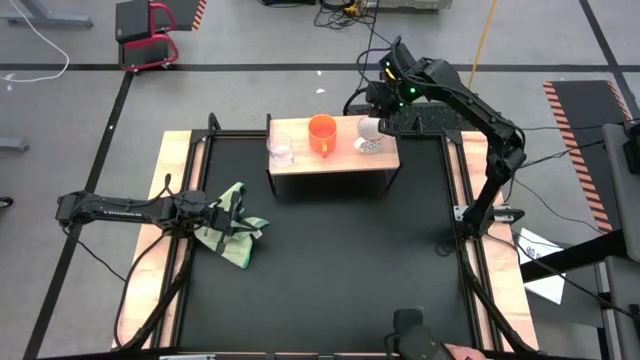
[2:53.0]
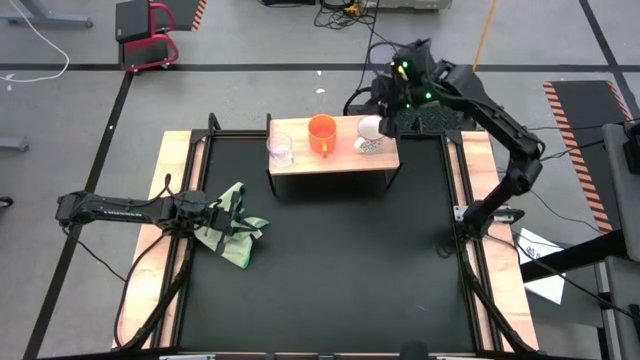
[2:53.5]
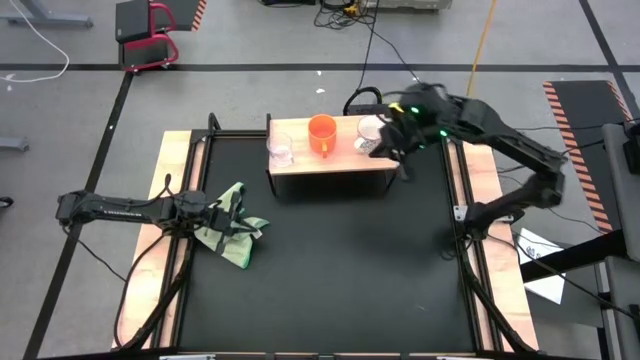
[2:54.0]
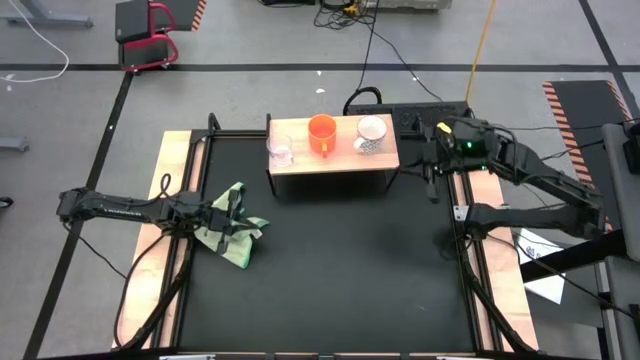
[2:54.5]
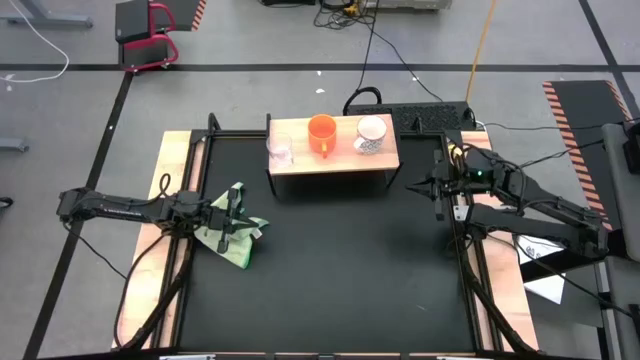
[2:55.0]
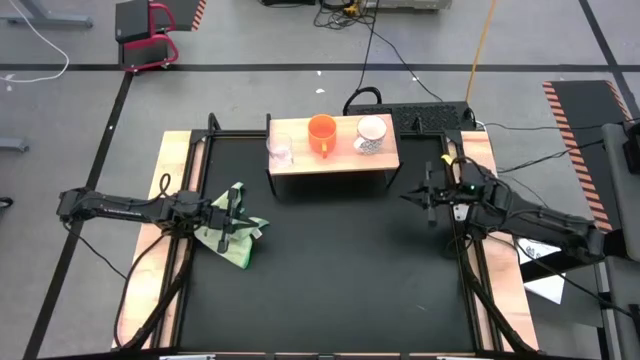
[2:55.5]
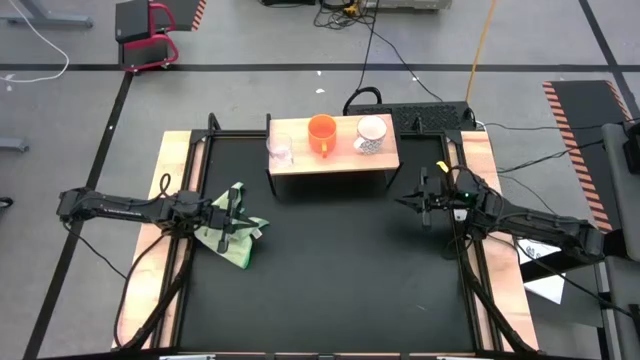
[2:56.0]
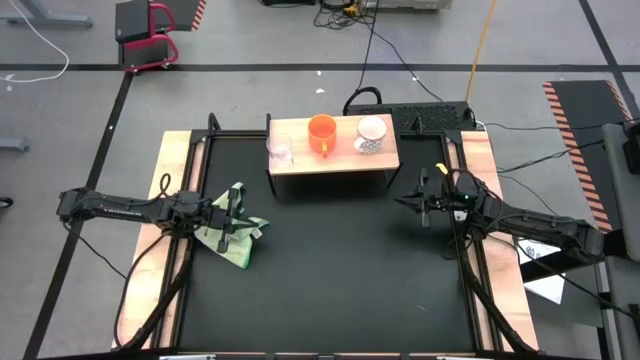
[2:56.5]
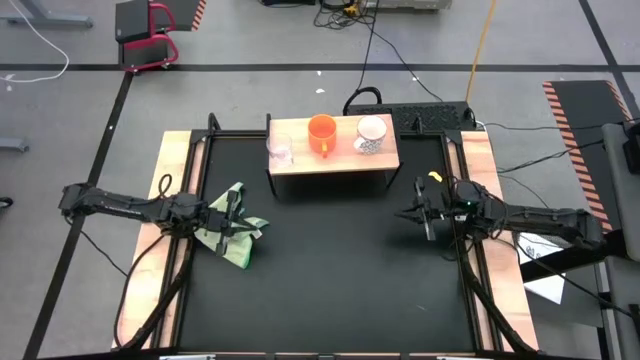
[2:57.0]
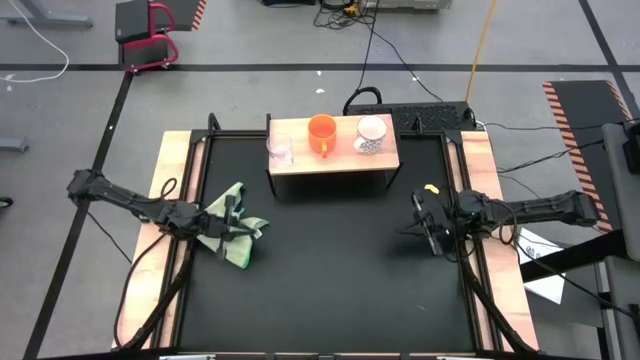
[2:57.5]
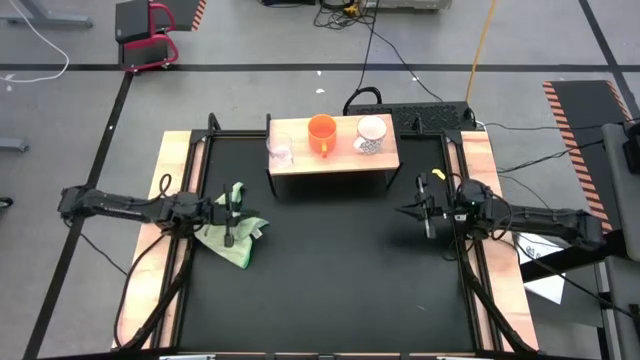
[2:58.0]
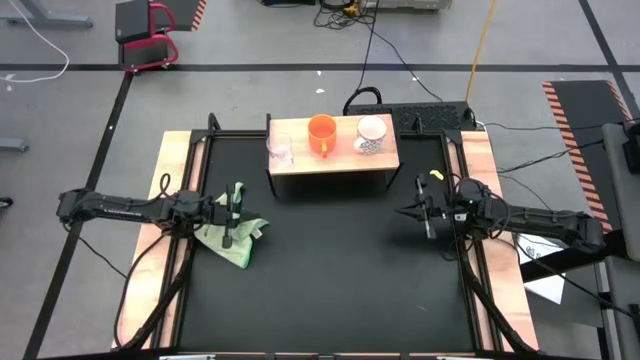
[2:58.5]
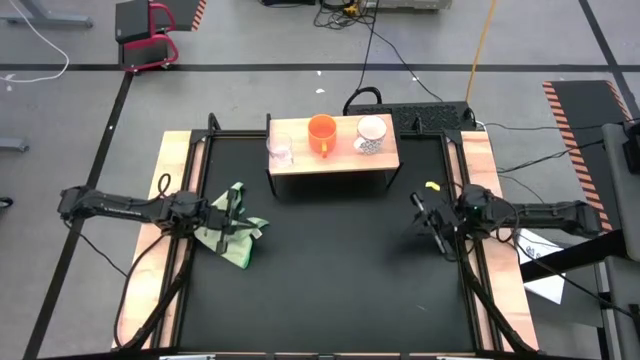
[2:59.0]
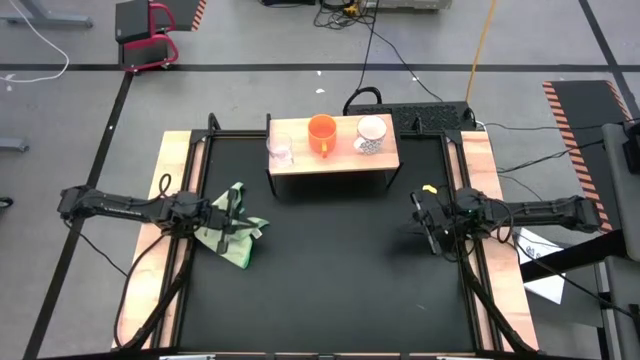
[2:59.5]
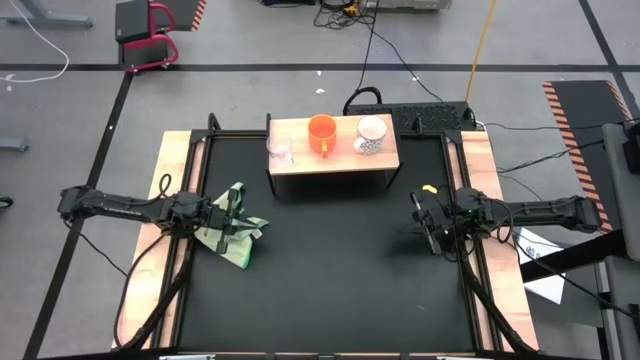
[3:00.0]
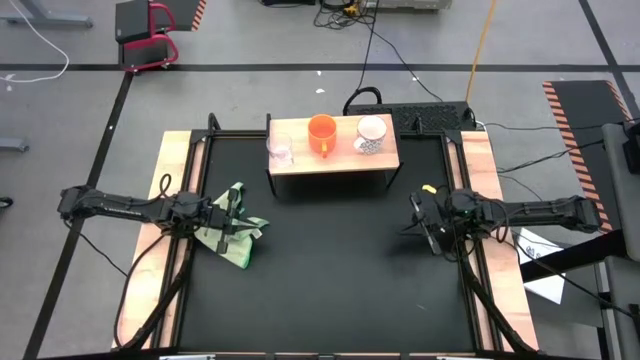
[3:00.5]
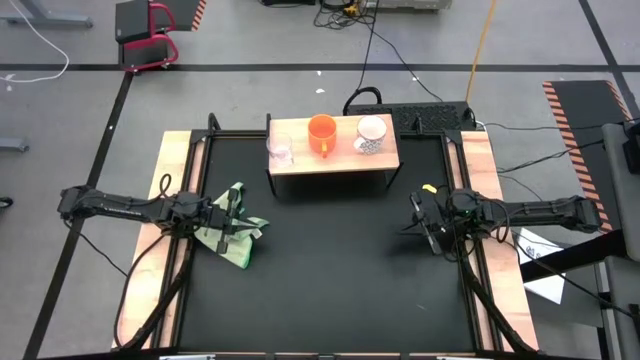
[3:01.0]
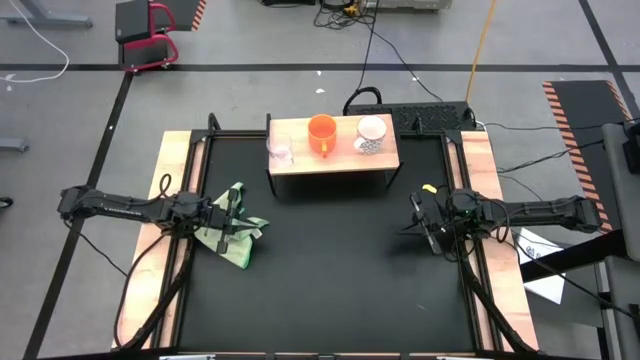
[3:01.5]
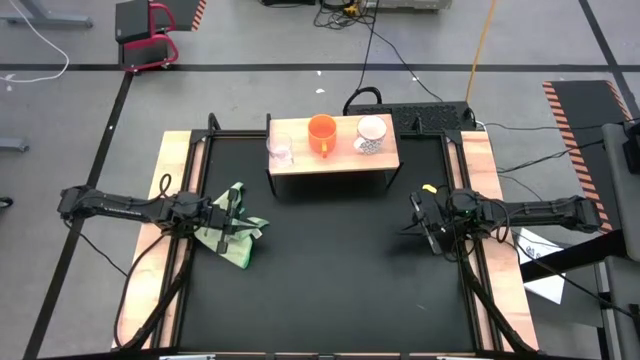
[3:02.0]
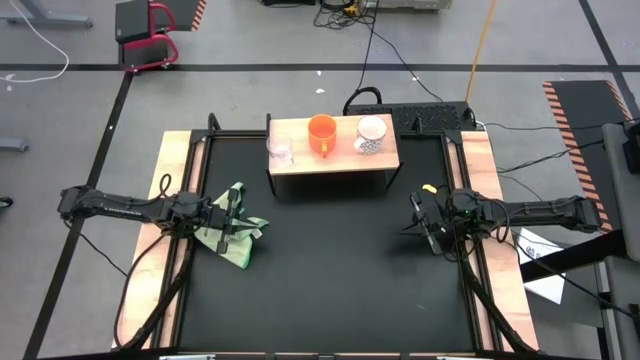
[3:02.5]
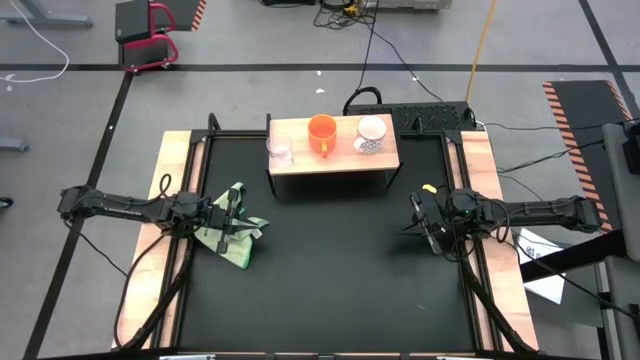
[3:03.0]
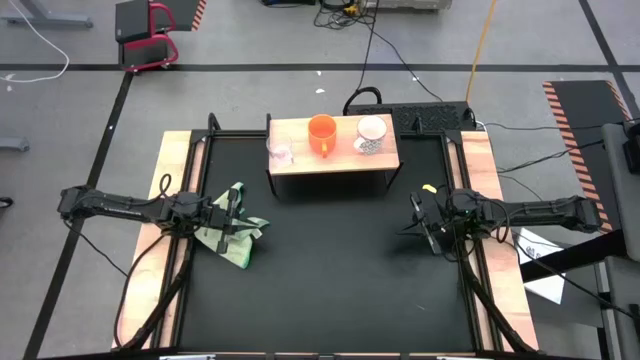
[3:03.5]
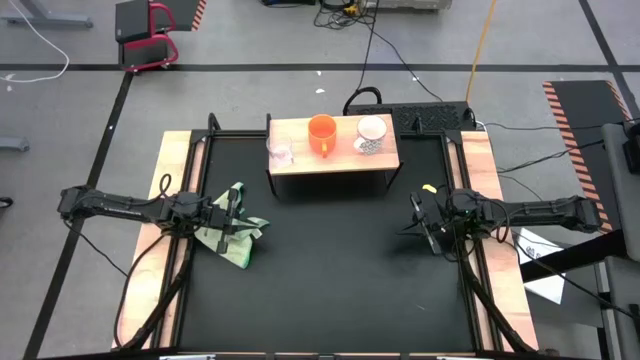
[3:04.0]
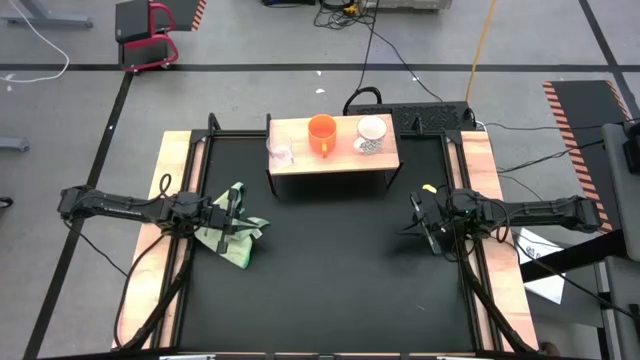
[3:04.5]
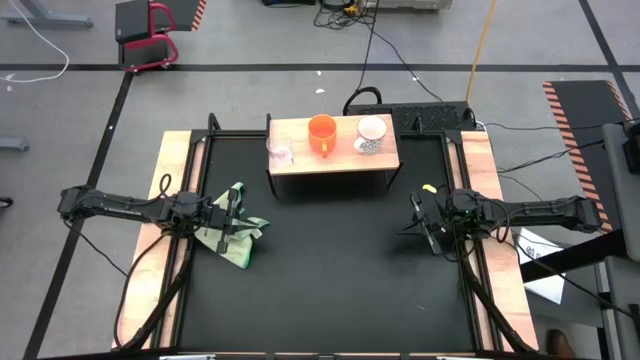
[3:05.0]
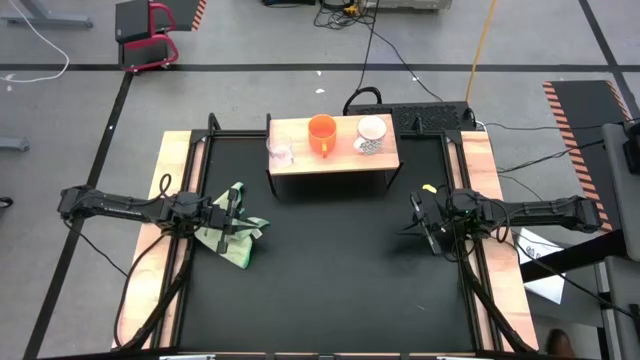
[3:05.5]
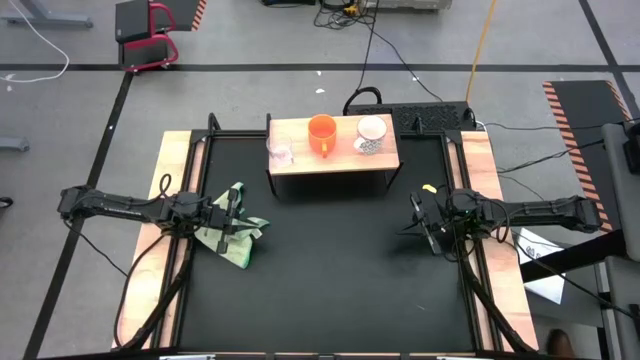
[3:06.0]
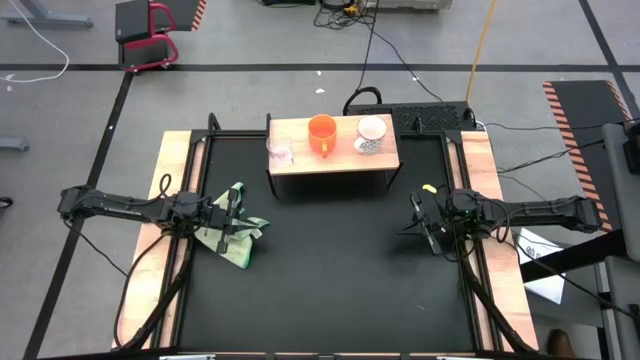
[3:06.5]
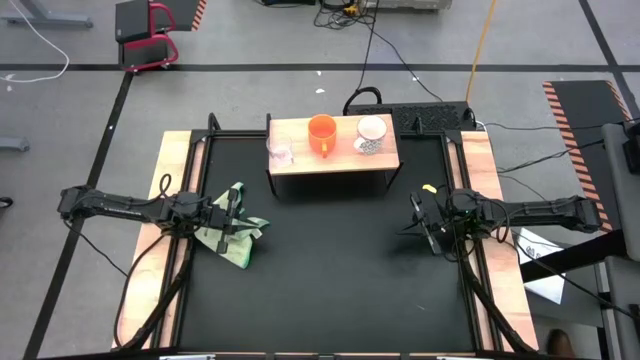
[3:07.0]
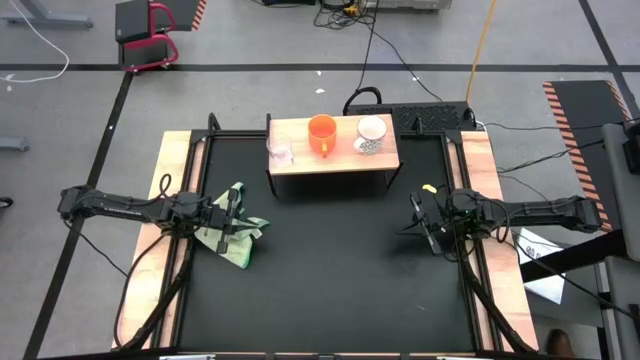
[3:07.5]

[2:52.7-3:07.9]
Task: Stack small to large cups/mugs on shelf
Return to Home Position

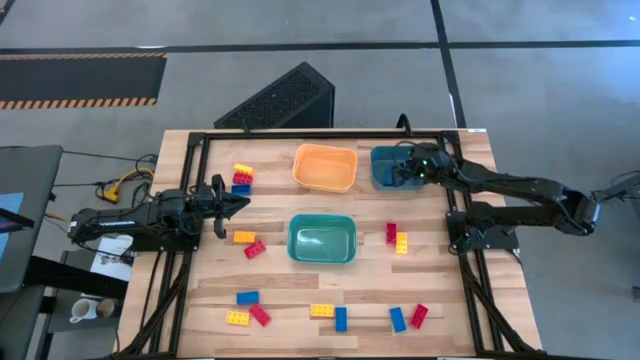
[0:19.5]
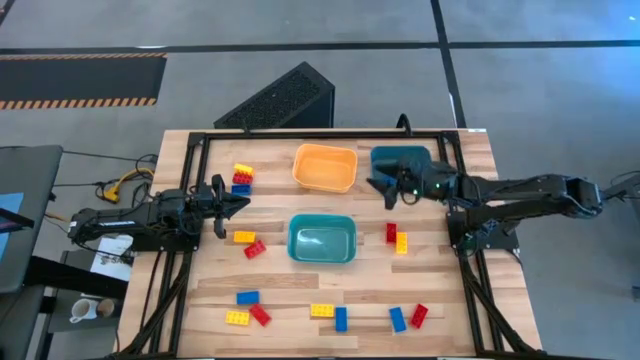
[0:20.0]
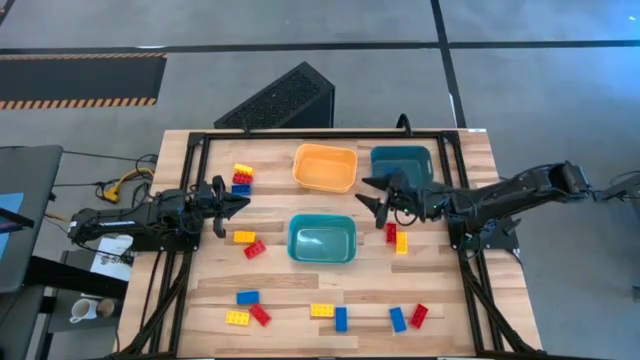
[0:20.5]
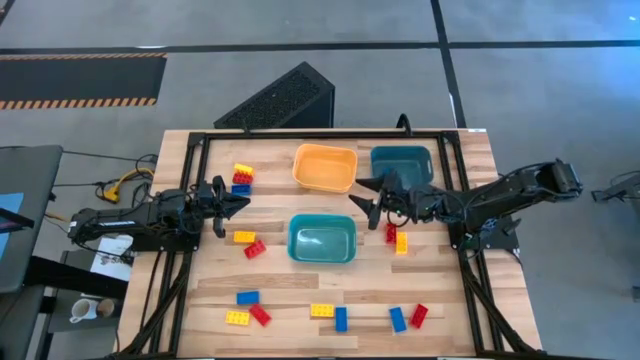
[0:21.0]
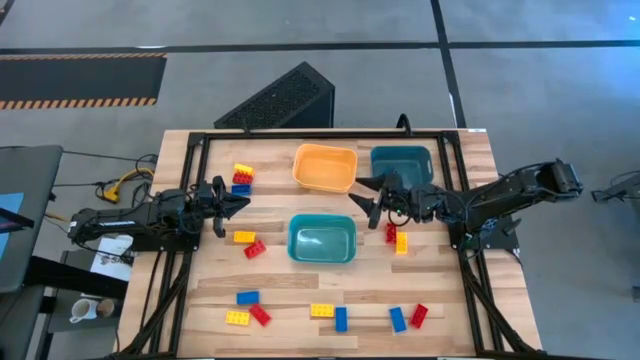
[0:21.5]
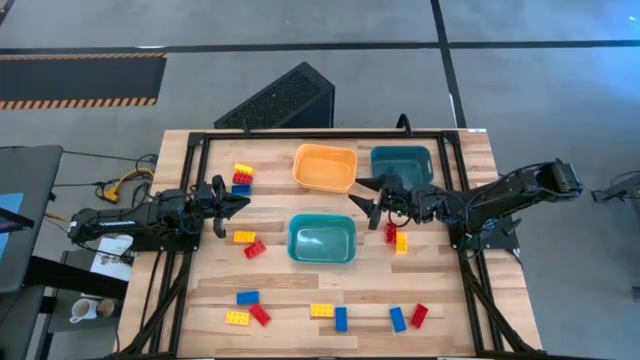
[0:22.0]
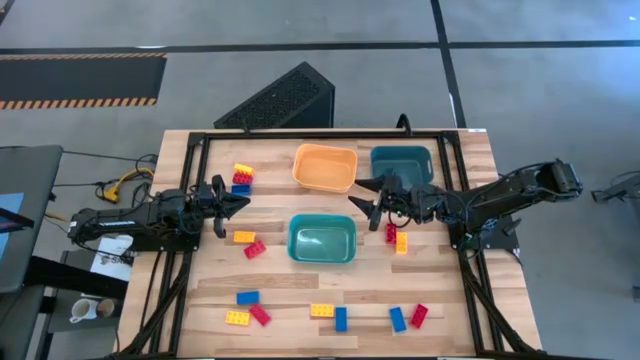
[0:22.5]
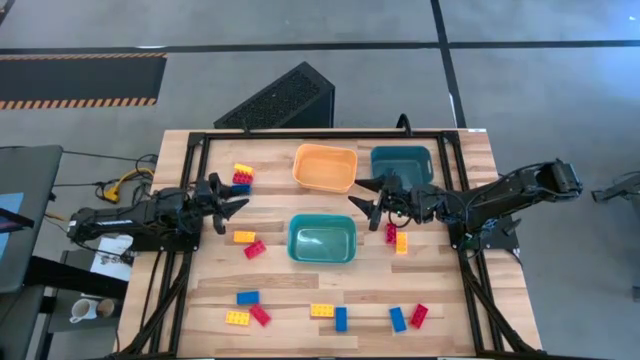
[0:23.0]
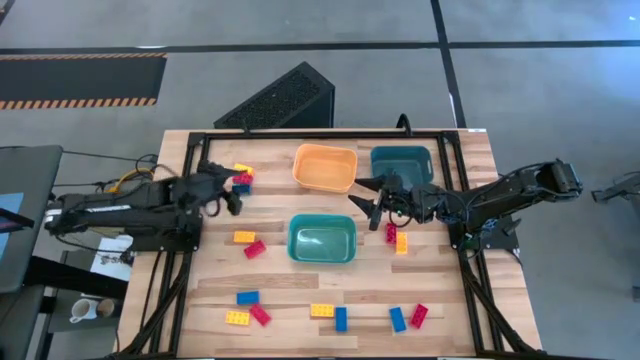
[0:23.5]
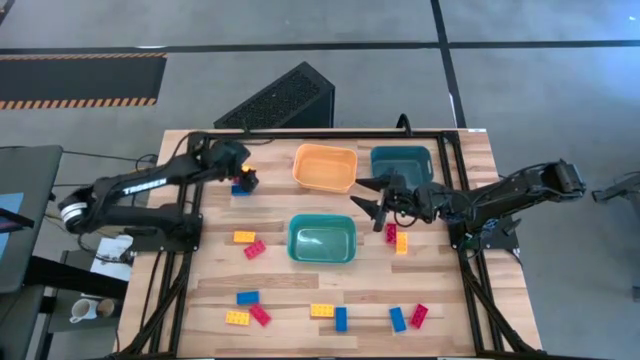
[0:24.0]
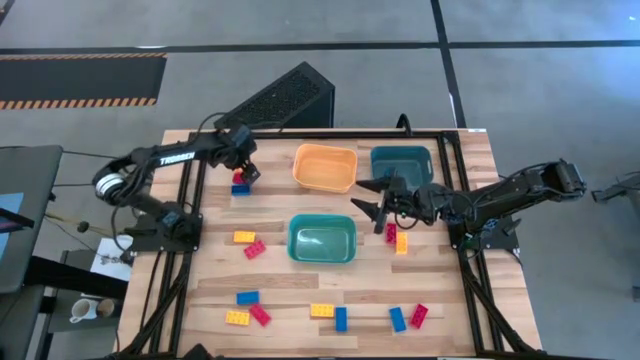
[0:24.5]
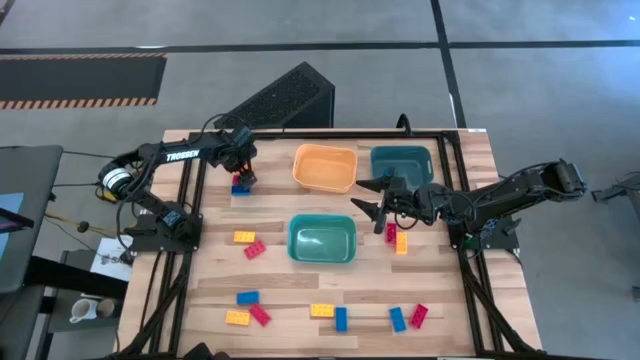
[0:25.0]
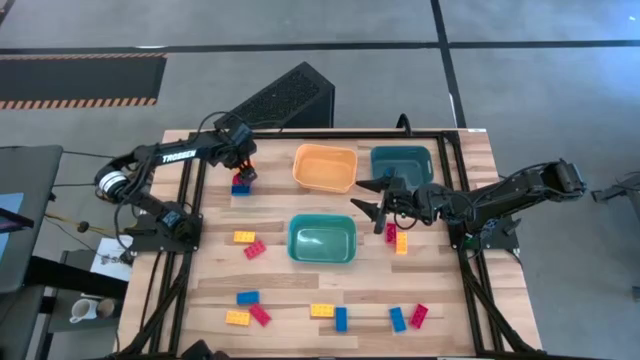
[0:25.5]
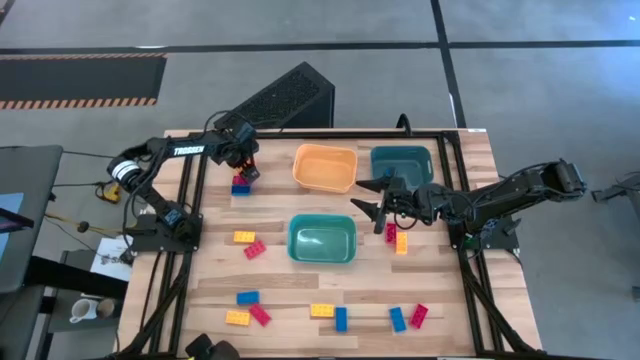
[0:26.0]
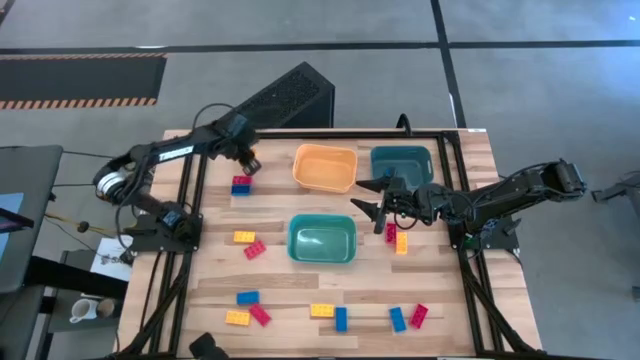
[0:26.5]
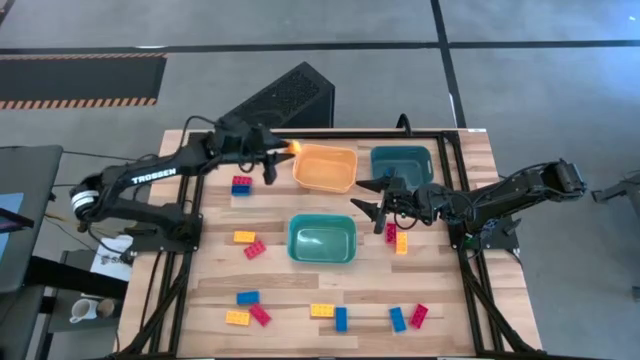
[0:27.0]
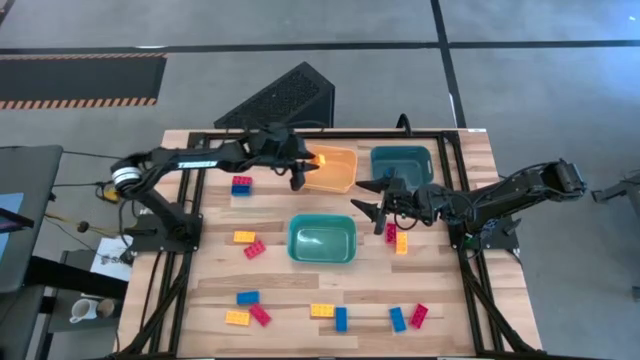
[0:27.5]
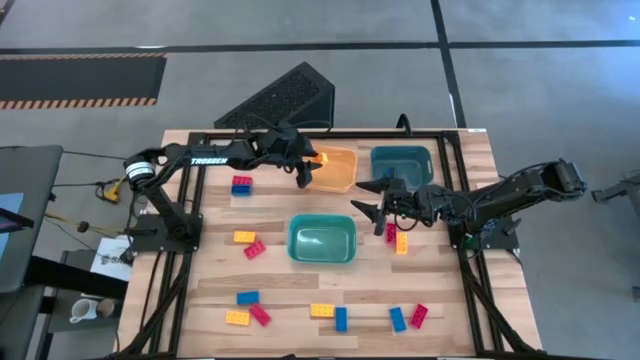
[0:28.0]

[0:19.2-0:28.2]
Task: Sort & place blocks by color
Put the yellow game piece into the yellow bin
